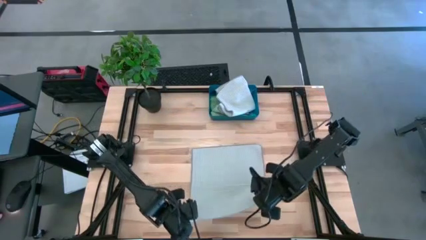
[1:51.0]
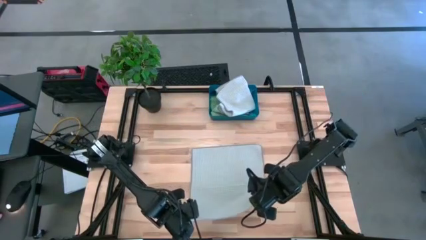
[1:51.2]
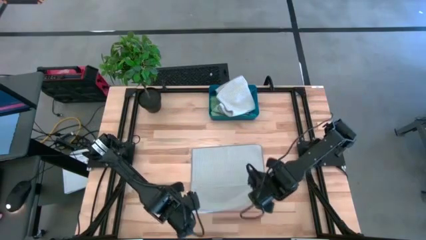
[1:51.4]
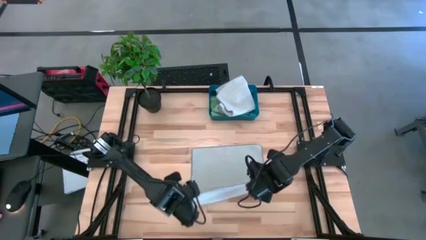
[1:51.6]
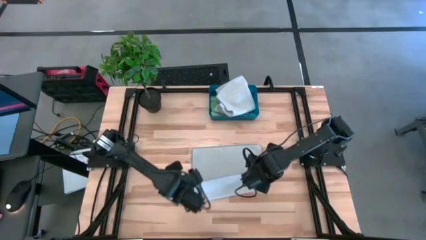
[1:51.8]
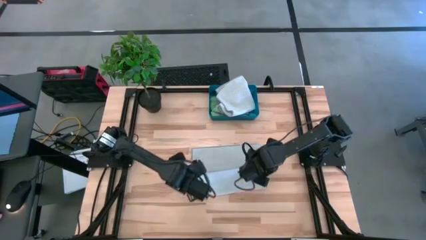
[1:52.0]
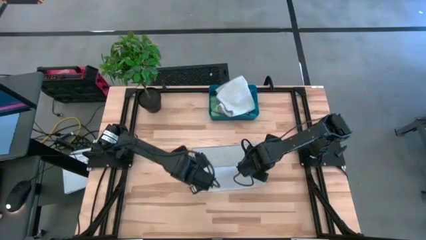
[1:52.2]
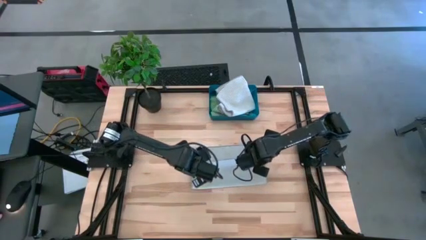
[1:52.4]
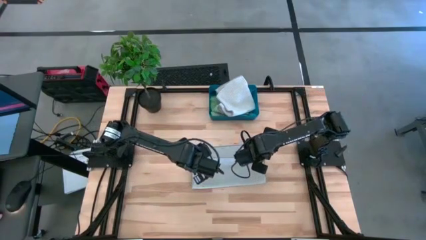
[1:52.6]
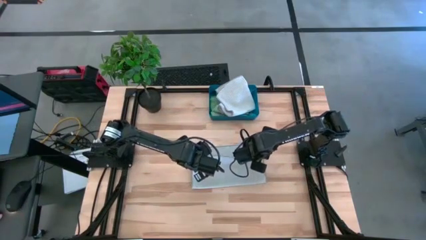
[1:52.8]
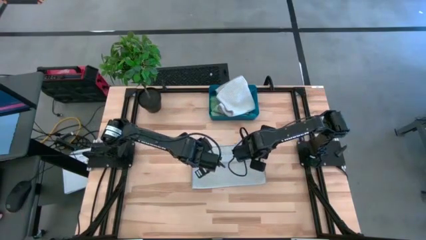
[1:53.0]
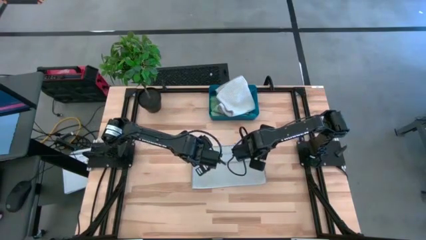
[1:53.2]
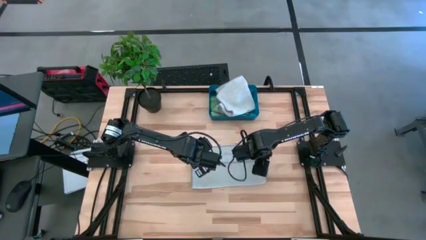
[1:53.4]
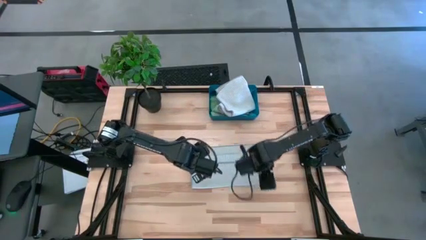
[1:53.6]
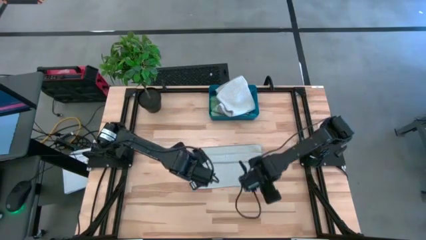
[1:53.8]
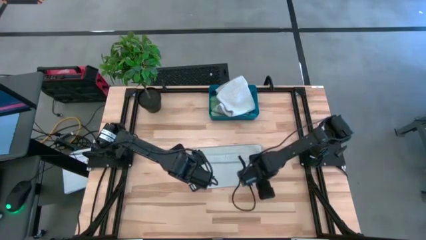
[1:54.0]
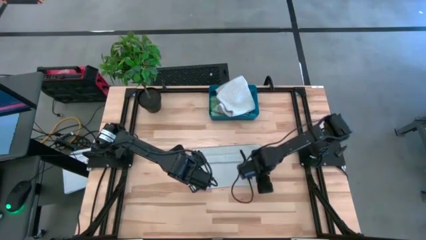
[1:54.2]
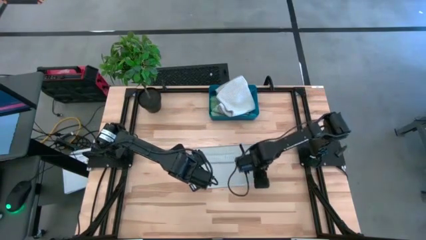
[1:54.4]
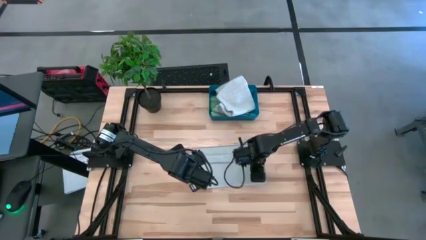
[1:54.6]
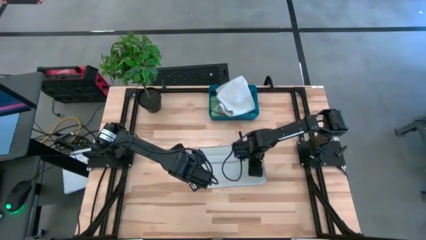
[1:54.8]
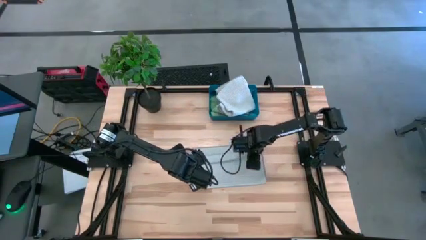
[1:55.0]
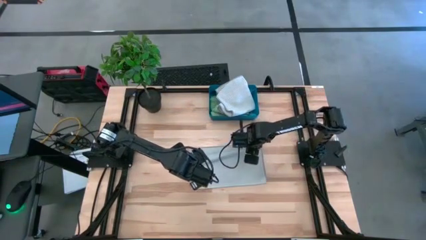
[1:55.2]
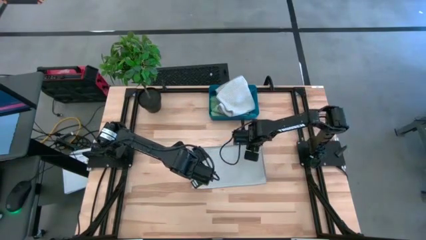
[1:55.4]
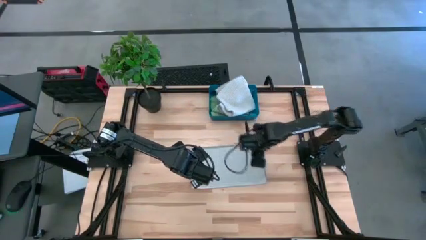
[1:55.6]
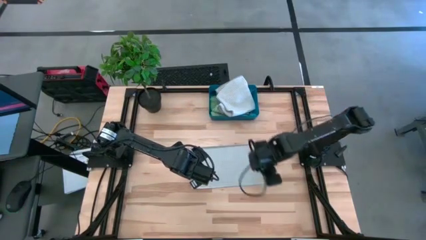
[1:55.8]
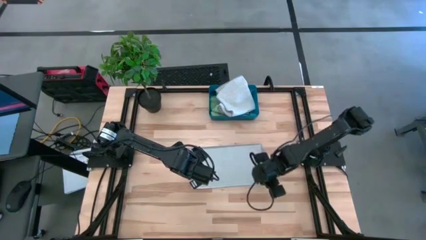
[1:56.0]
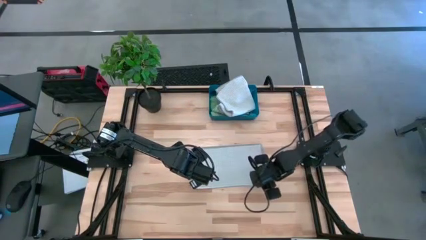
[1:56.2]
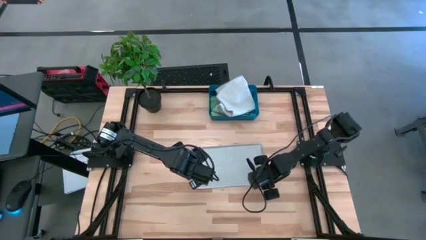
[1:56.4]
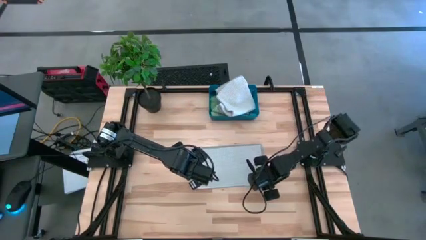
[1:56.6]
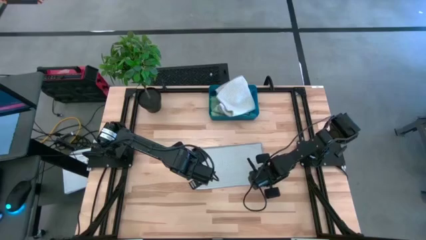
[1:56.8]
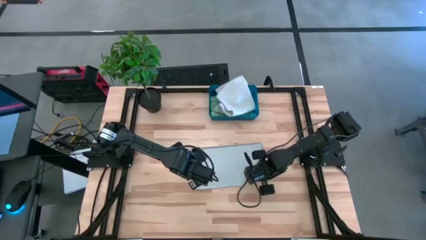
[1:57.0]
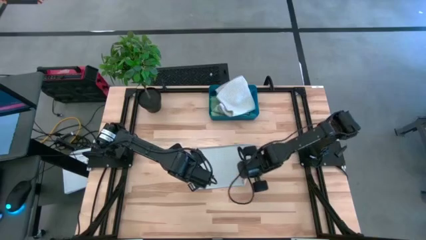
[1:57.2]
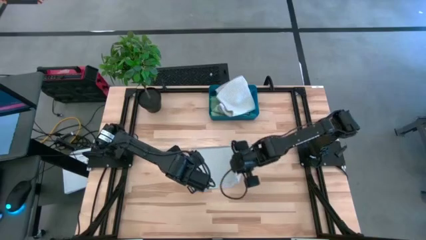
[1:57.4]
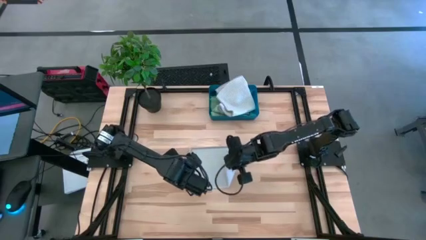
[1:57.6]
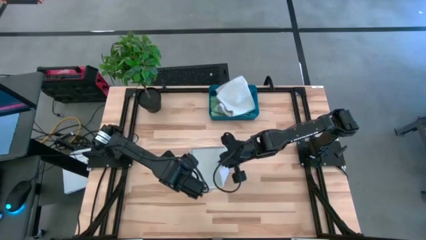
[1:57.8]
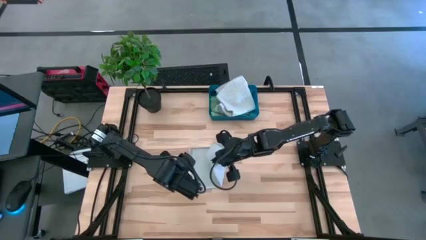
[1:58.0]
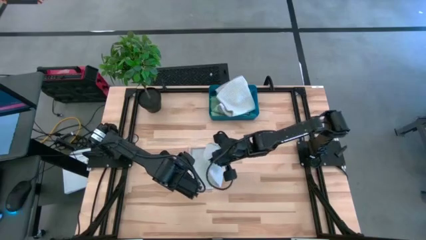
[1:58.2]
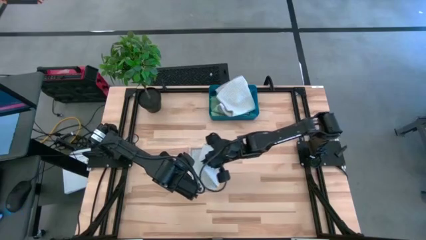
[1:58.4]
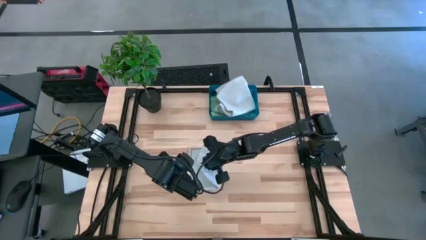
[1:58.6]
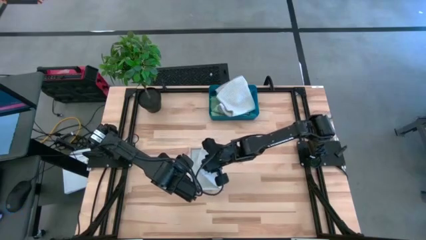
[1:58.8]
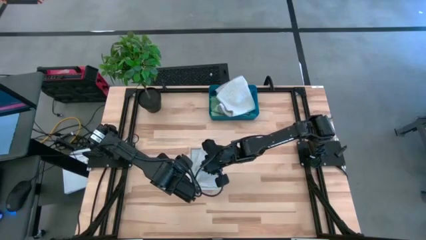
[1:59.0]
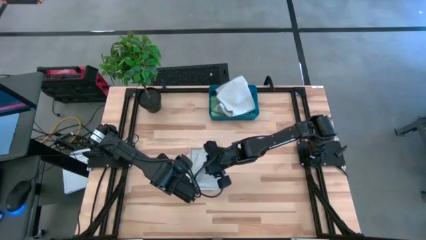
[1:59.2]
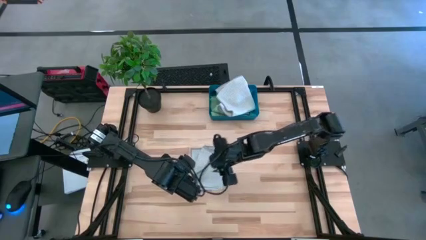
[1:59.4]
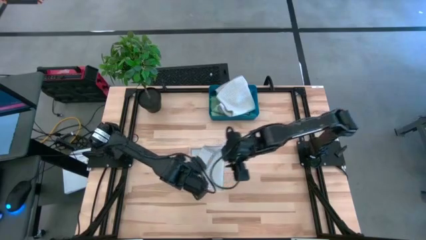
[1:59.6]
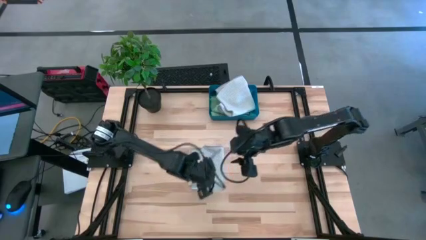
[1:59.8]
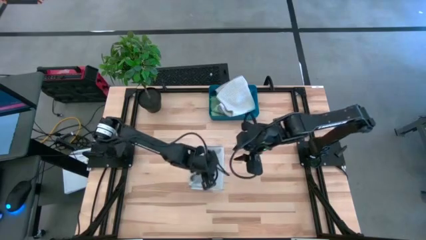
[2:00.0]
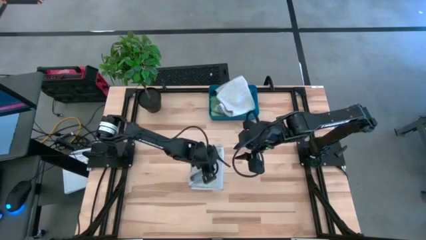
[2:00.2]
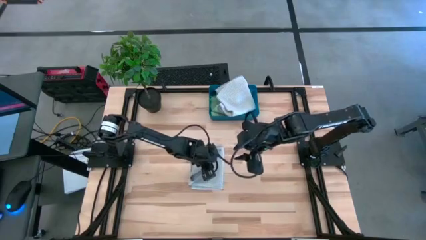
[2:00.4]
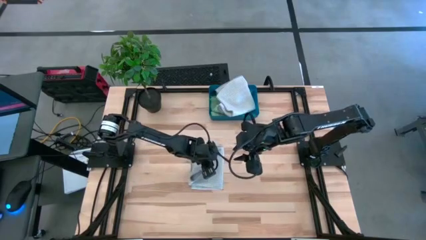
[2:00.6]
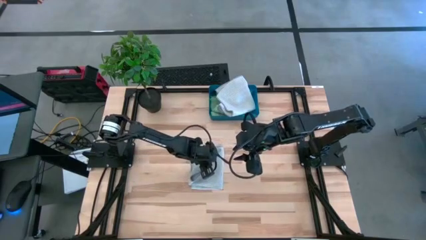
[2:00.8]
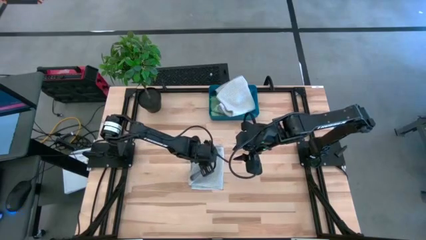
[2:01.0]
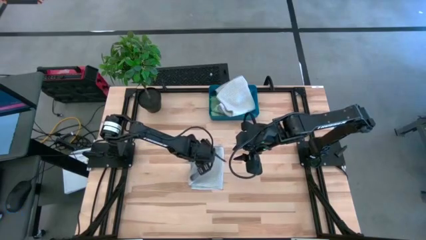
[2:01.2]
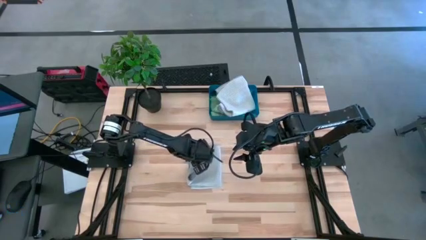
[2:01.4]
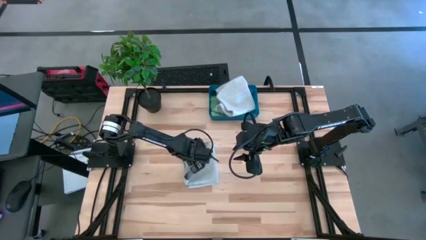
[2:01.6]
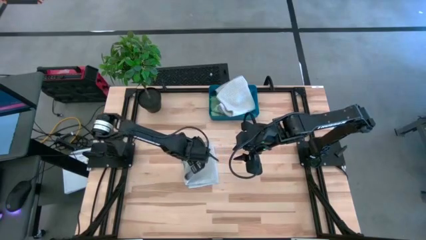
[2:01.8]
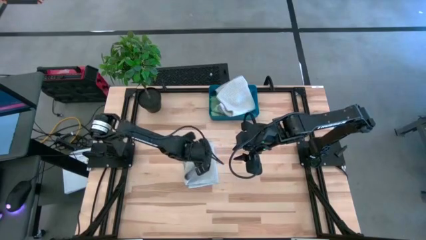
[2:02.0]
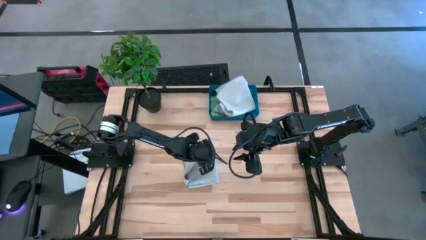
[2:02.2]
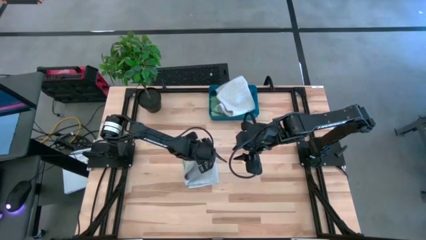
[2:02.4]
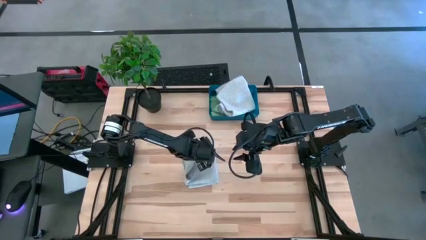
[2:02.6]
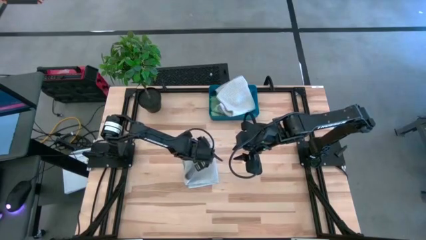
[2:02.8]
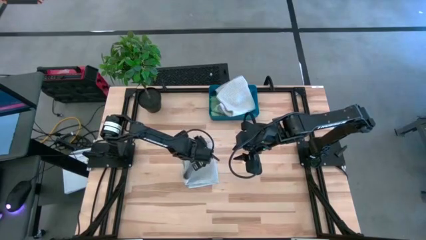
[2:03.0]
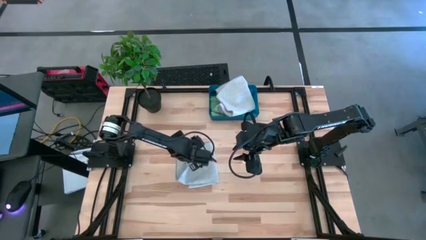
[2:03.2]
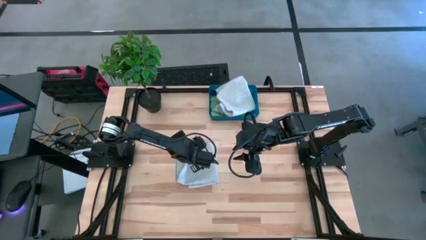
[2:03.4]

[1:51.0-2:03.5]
Task: Fold microfiber towels
Fold the gray towel

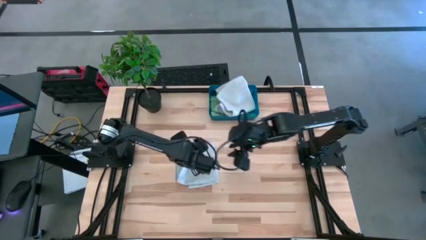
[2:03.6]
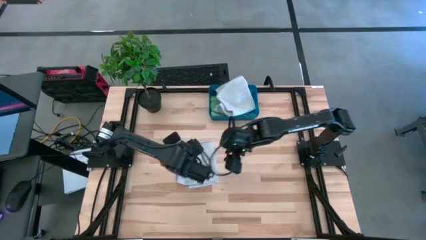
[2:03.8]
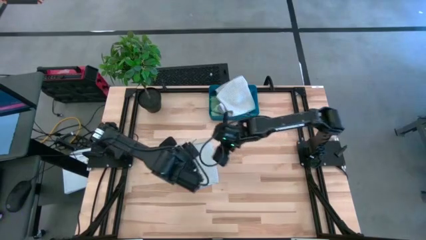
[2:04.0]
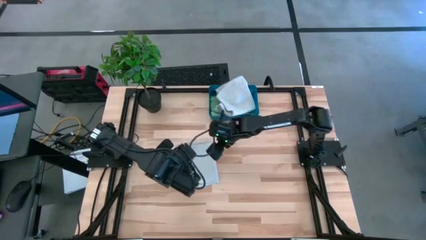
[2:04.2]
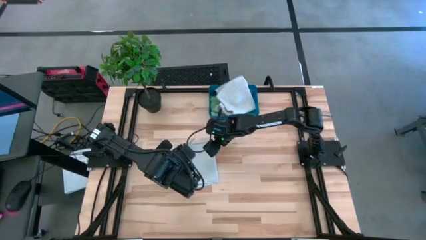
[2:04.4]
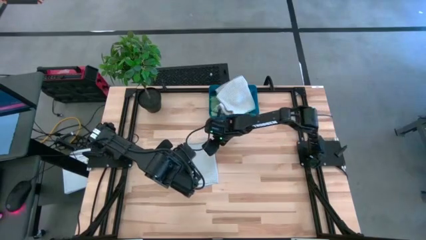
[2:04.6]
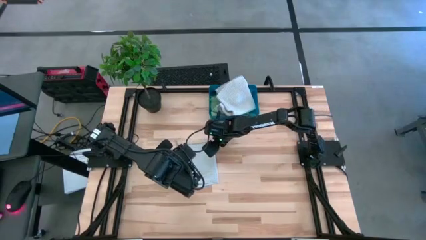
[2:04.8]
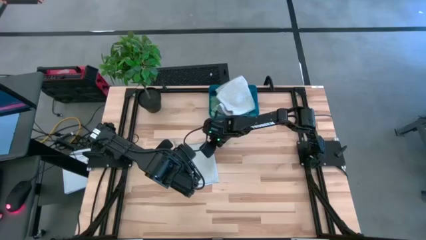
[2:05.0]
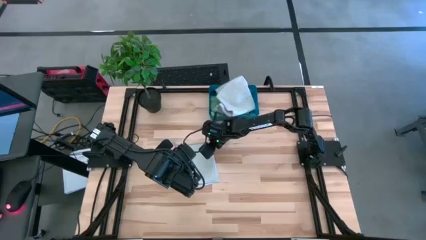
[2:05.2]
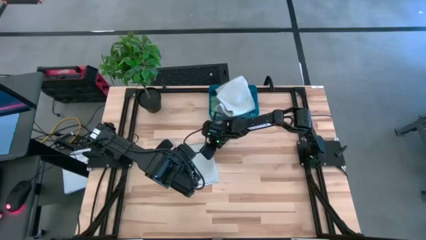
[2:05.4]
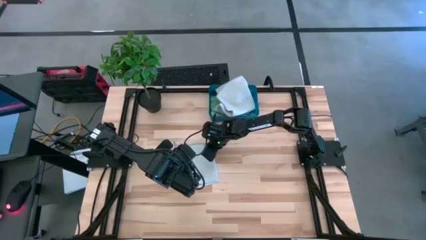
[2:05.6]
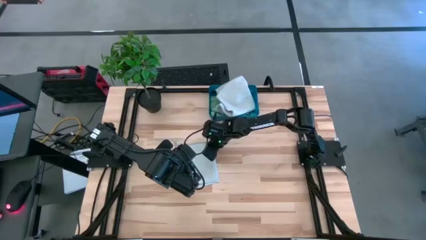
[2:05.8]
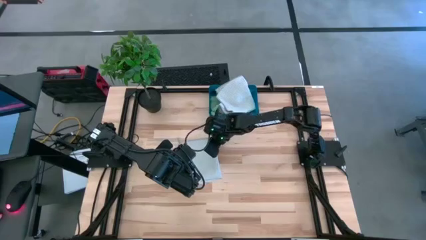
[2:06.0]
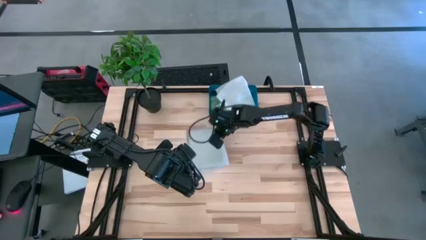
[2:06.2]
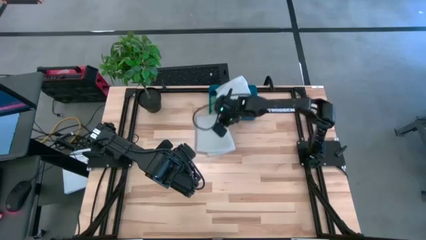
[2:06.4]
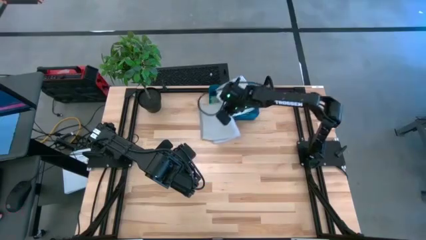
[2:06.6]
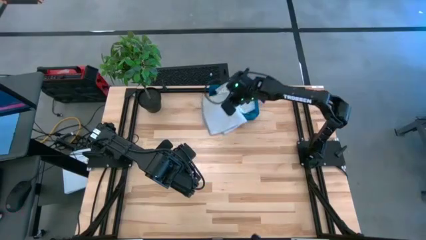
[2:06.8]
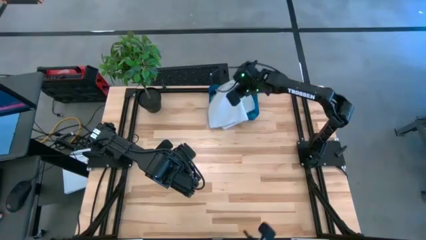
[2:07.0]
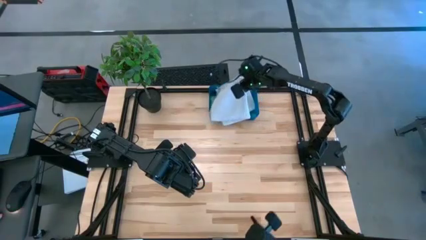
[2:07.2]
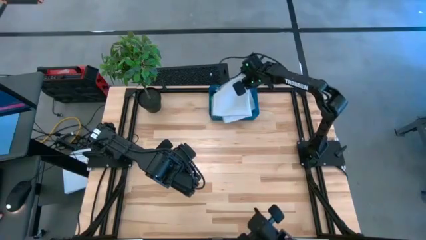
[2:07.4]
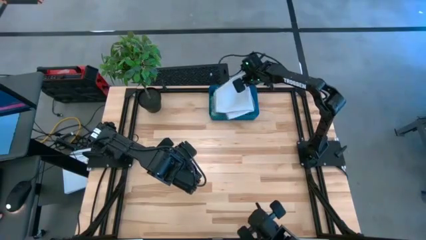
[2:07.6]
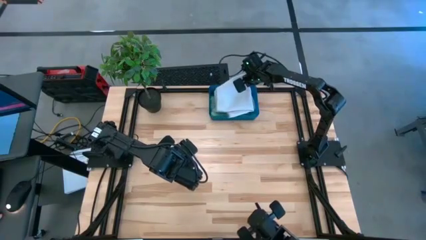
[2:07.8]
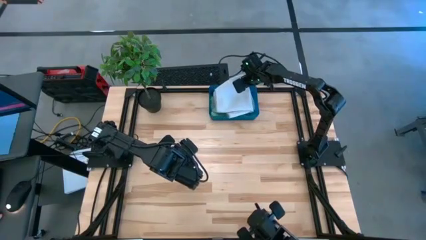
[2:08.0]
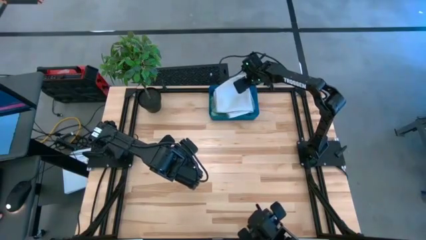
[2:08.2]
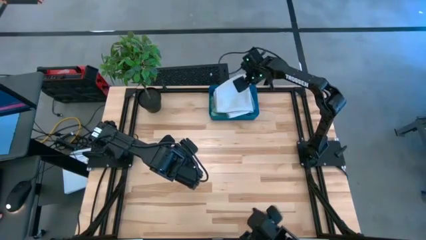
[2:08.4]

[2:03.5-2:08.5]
Put the gray towel into the blue bin
